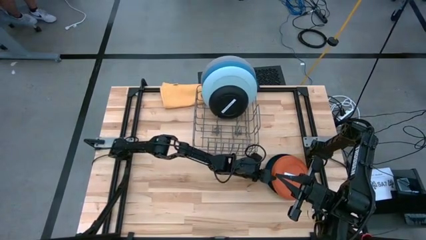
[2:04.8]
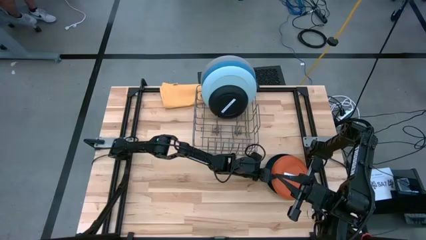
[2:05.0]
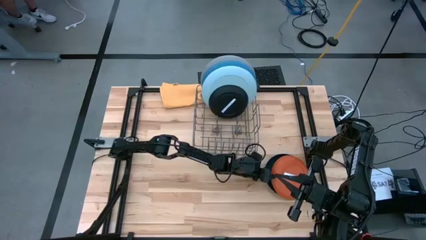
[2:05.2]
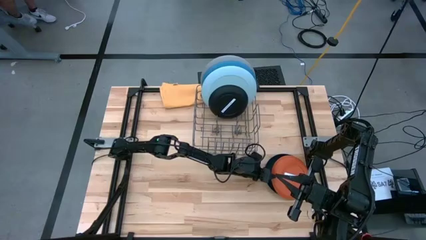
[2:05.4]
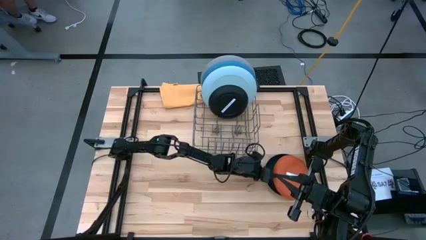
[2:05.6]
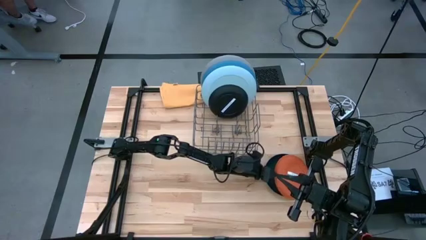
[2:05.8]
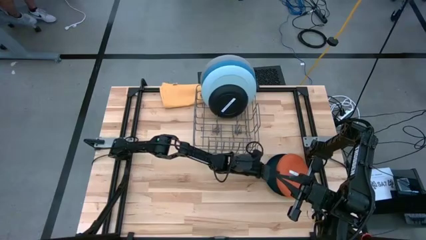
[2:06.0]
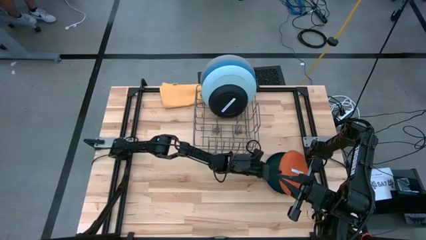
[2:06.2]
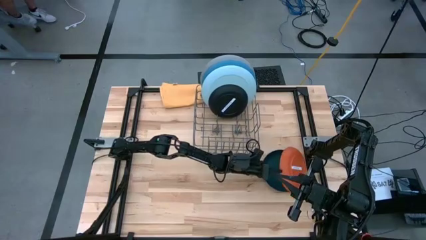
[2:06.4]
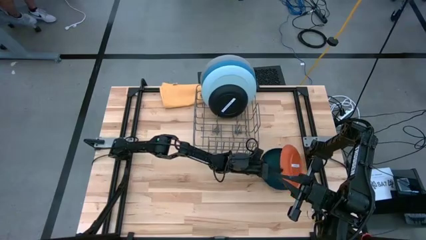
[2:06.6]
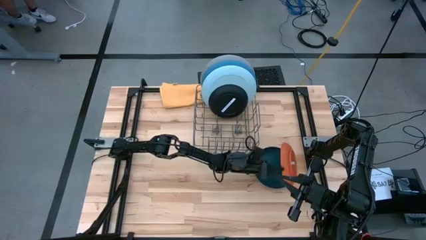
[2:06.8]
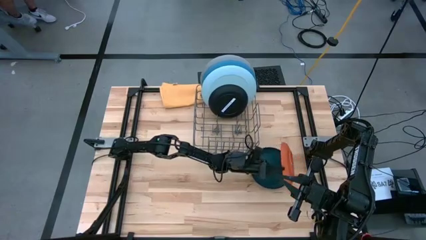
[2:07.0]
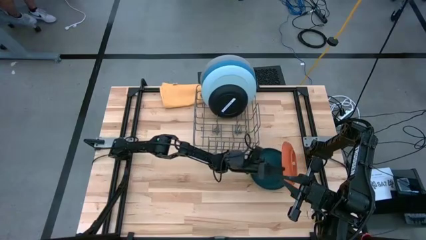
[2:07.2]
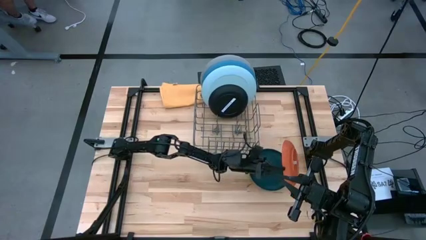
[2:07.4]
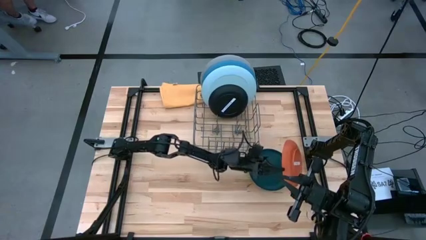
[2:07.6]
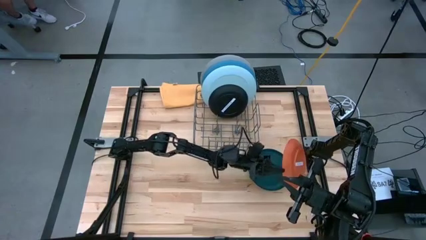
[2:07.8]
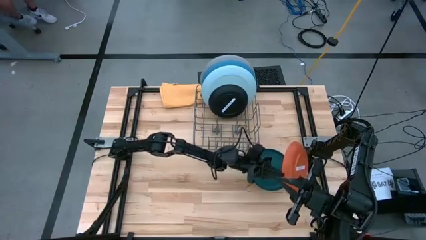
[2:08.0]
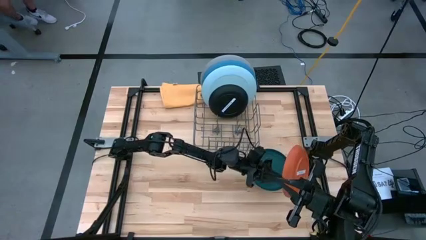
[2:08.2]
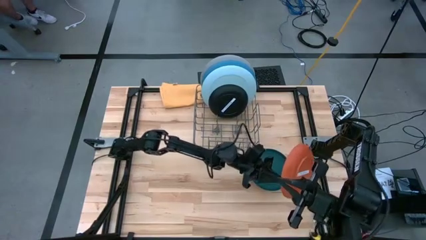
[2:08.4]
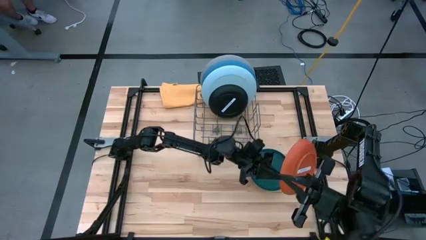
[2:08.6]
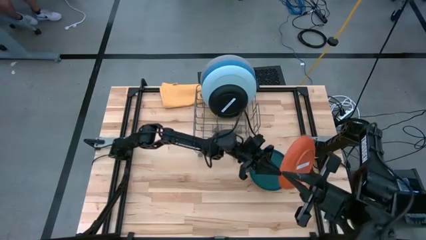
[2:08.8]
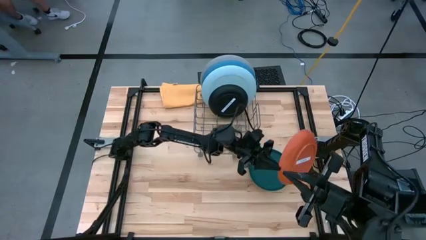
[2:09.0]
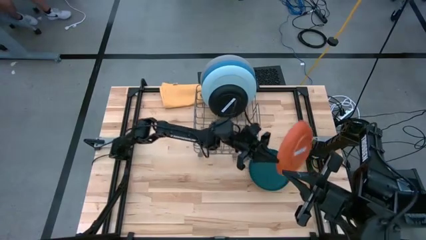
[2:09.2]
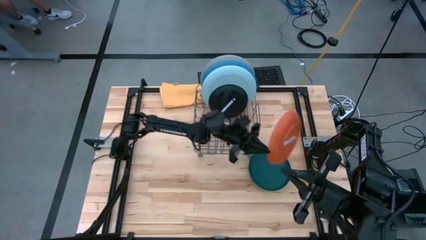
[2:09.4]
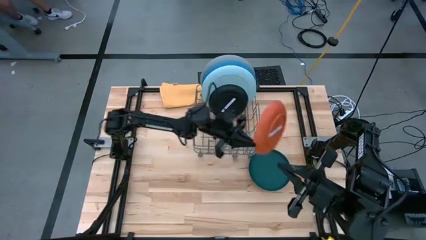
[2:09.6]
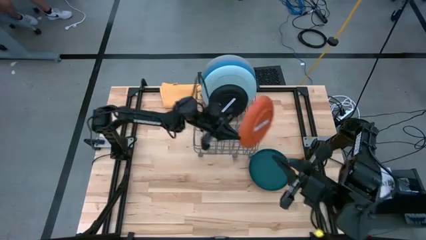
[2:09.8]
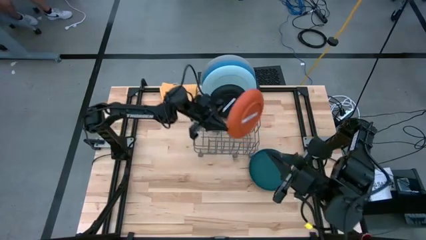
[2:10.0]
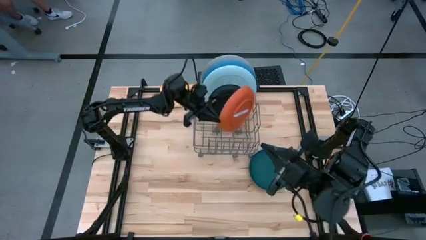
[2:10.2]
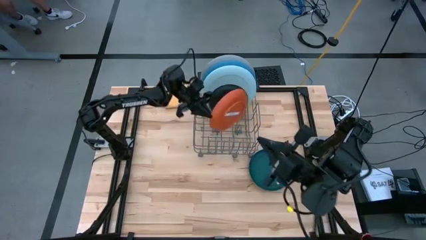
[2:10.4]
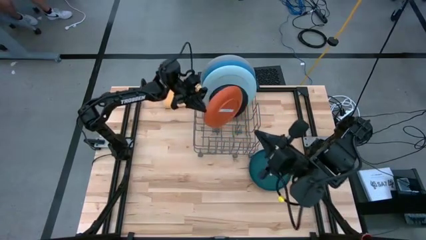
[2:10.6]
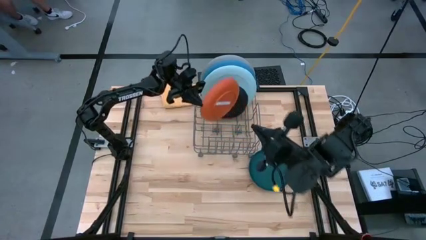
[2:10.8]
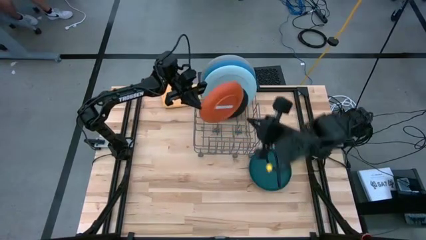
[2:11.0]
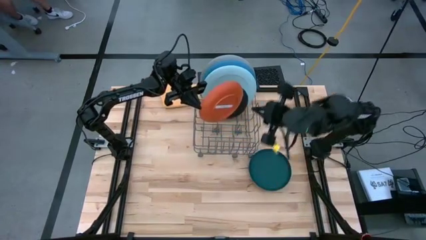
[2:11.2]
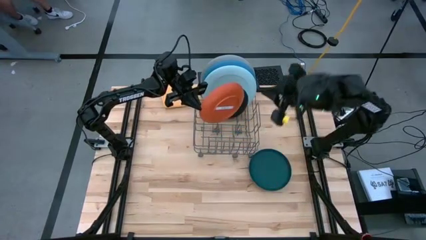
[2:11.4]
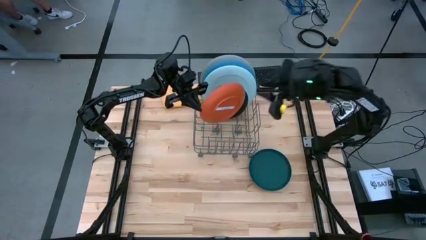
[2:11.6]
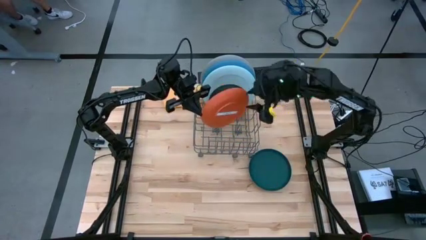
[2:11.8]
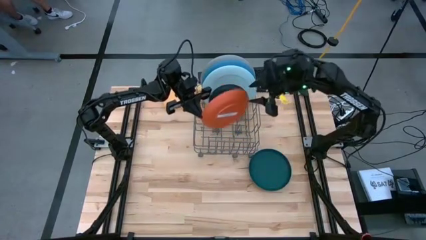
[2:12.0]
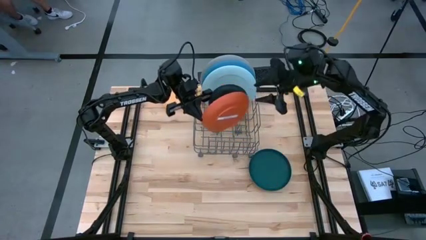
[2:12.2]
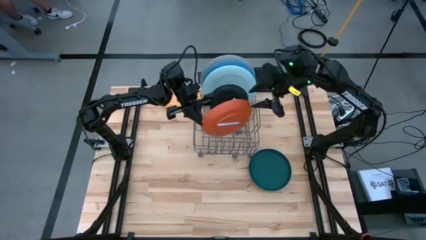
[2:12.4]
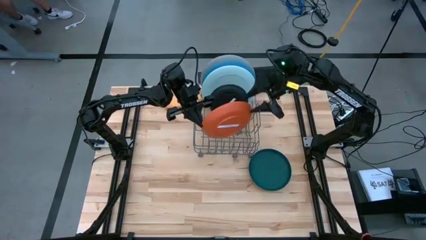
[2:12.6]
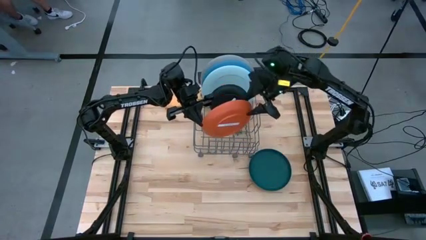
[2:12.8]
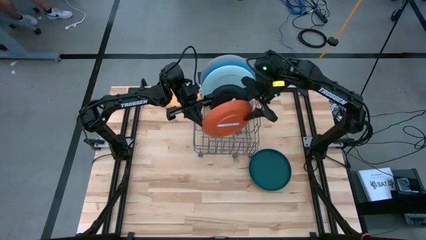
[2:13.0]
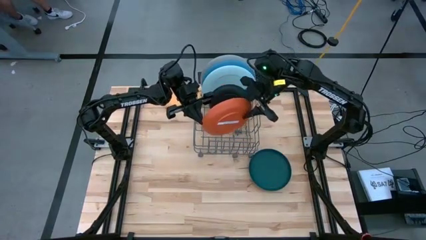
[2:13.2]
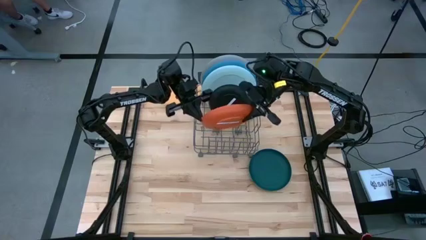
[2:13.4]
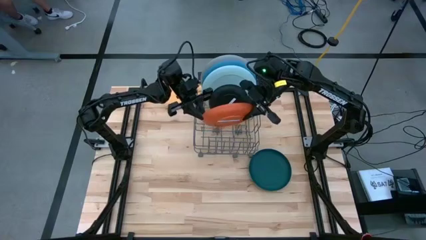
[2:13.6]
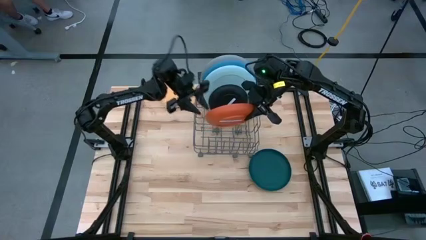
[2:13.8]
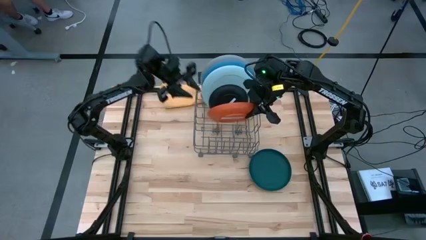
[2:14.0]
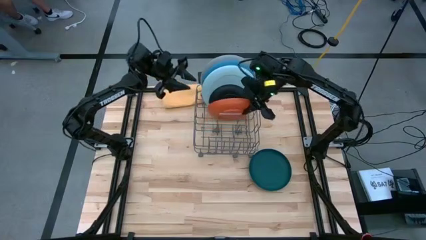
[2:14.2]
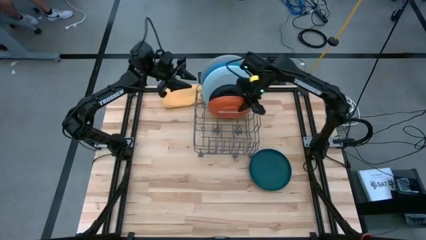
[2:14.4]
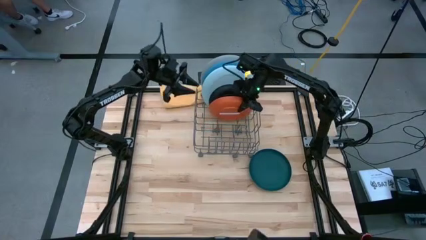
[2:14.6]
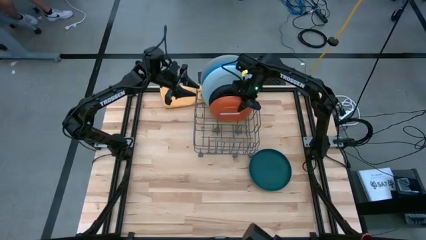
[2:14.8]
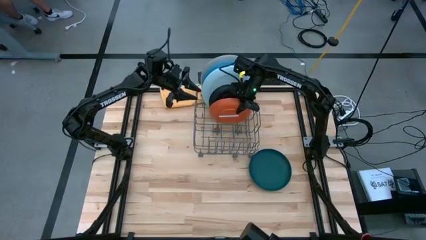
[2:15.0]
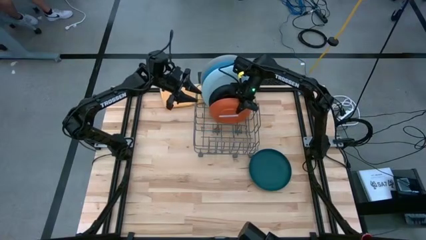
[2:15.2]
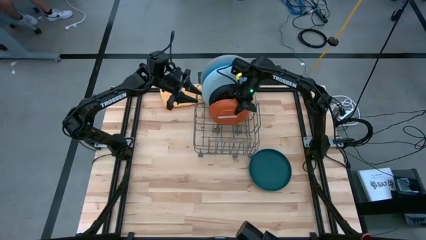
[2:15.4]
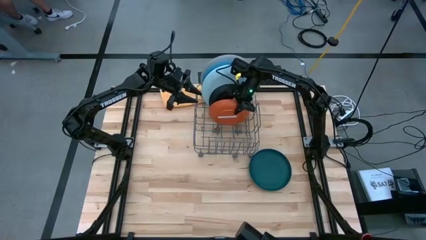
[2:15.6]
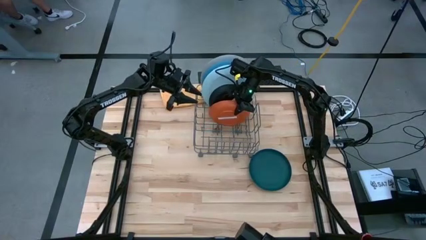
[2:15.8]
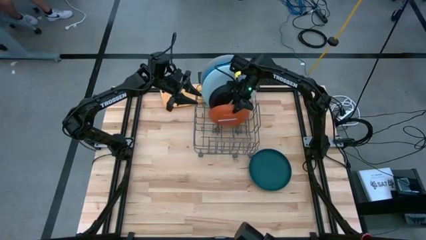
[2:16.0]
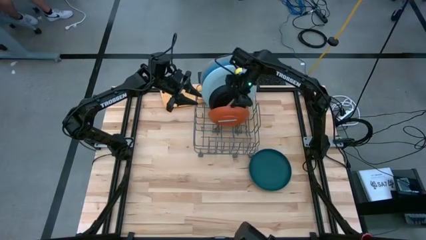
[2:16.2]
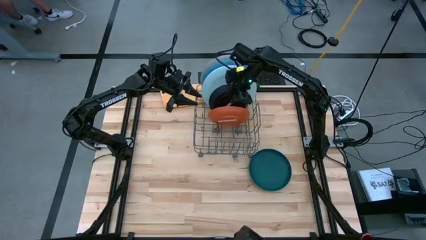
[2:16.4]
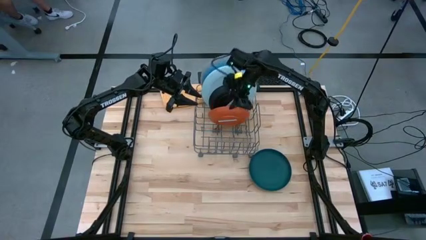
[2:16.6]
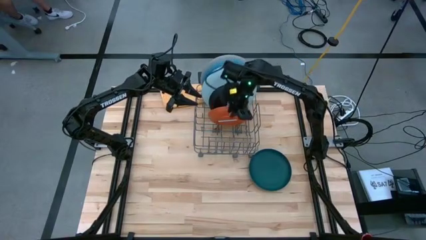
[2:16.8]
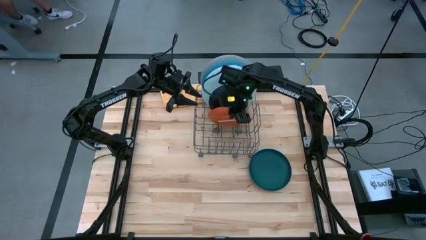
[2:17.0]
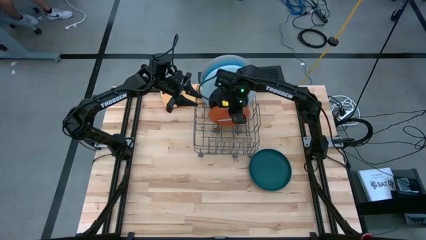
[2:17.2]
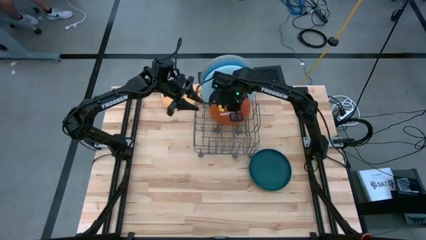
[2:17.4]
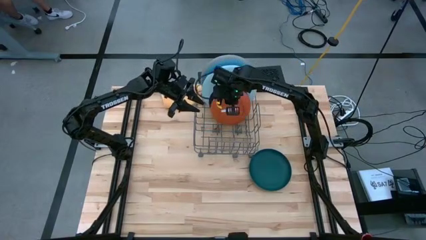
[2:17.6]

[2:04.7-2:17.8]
Task: Sort dishes
Put the orange plate into the dish rack

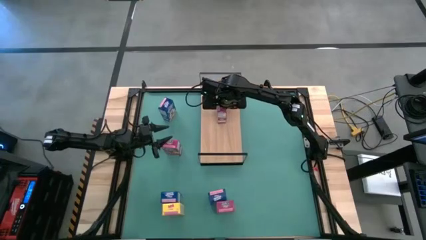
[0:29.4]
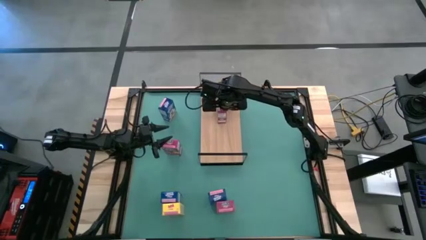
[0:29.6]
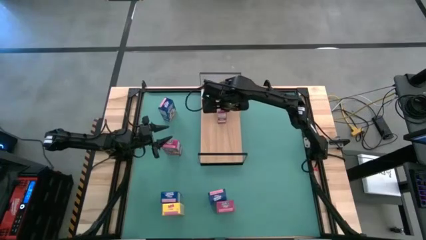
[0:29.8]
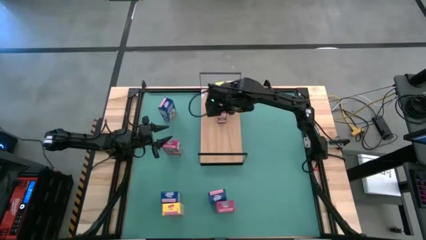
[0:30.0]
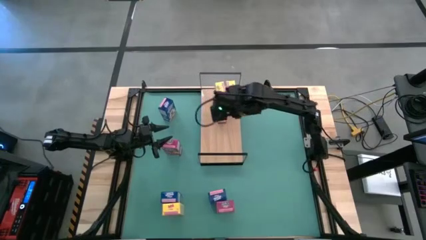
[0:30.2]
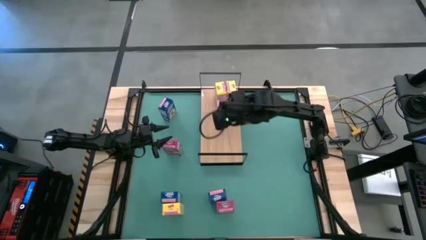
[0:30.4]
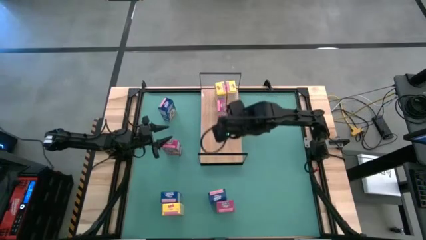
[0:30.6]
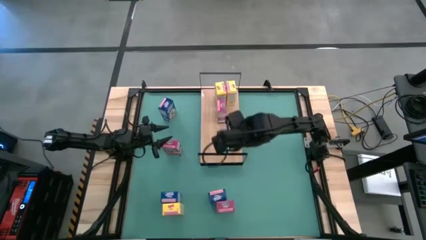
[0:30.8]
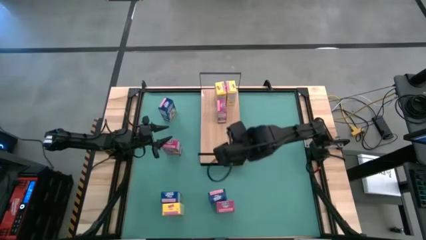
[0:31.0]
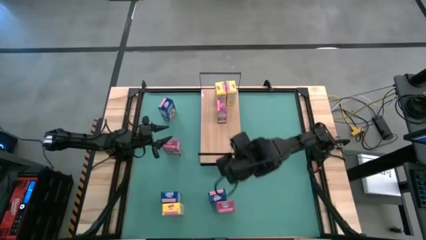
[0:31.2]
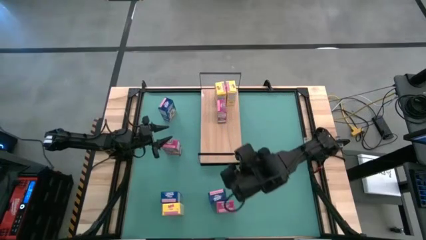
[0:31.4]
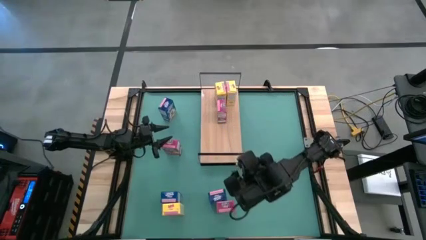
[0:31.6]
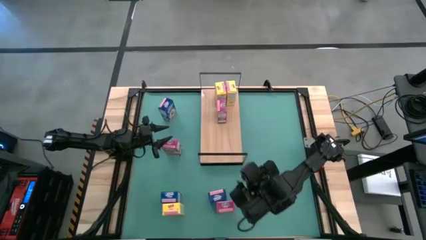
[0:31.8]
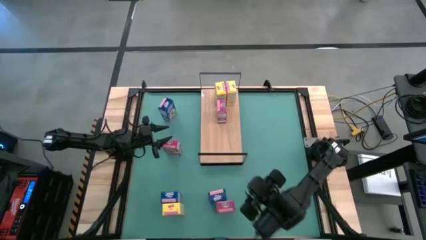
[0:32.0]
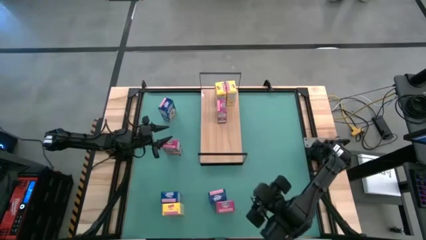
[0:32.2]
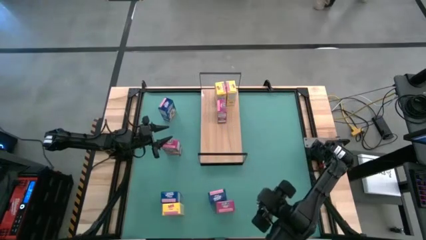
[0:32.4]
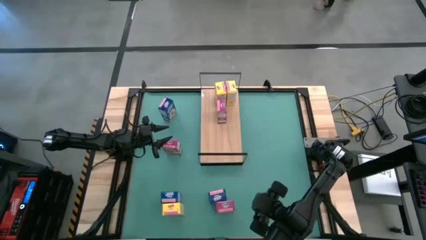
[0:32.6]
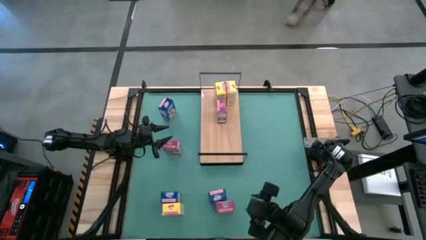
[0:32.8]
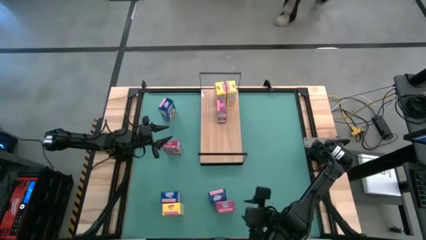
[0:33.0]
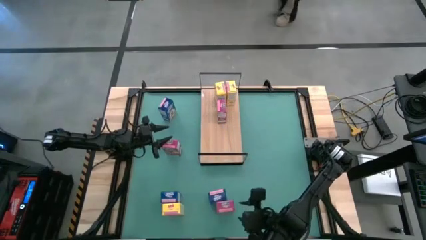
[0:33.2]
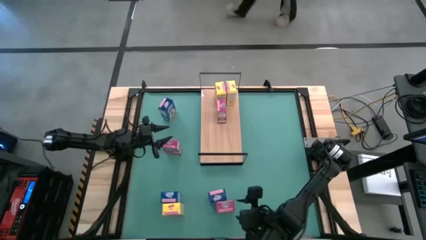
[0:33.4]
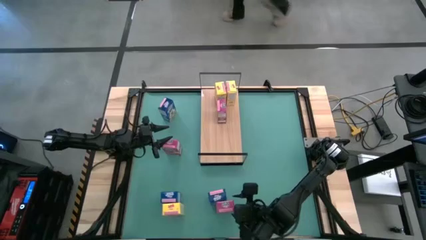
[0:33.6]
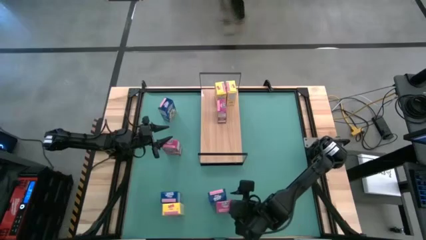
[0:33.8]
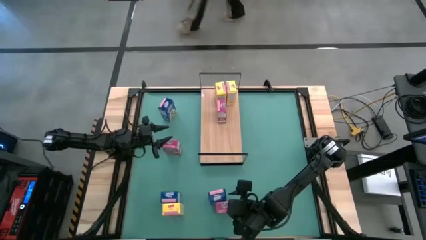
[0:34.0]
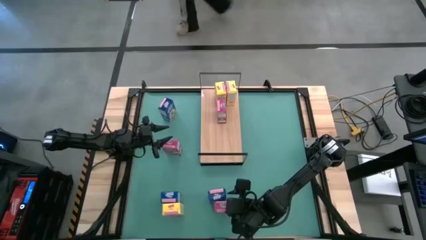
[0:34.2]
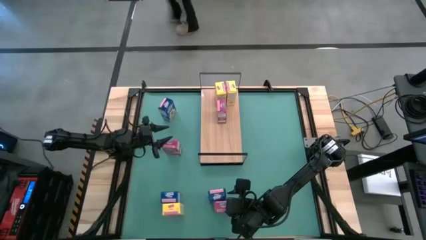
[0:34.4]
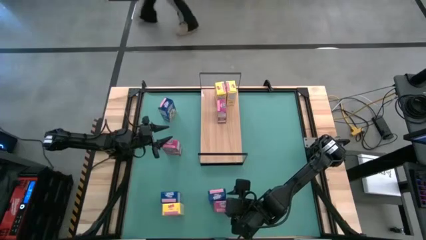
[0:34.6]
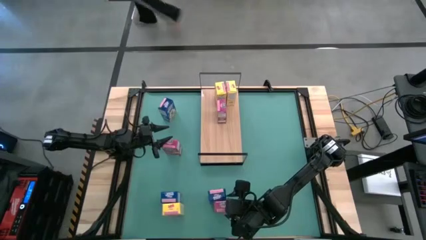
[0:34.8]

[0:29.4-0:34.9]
Task: Stack cereal on shelf
Put the bottom purple cereal box on the shelf aligned with the other purple cereal box
